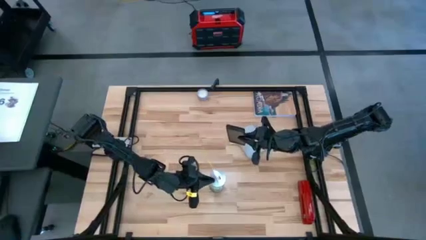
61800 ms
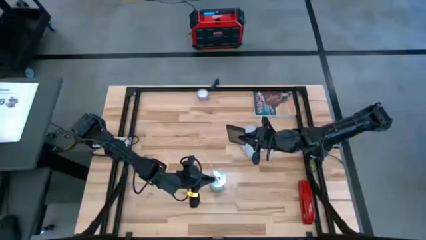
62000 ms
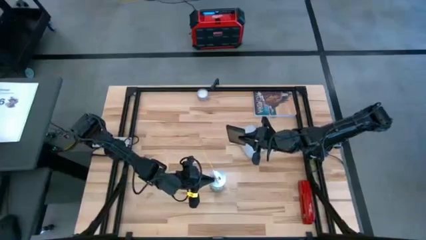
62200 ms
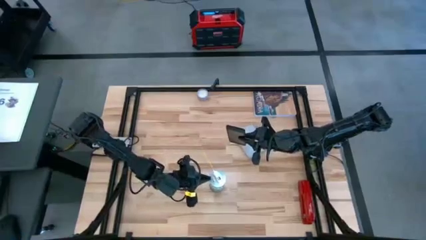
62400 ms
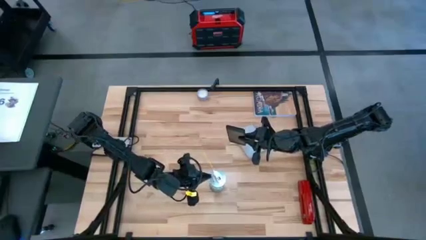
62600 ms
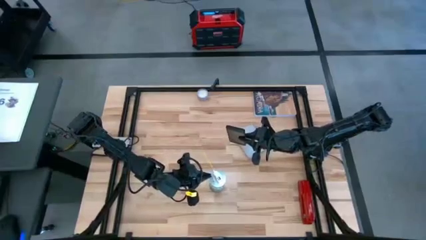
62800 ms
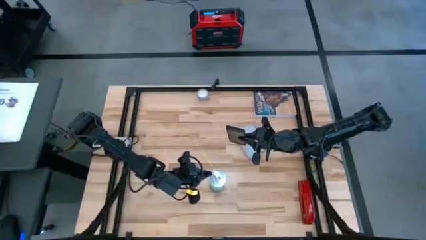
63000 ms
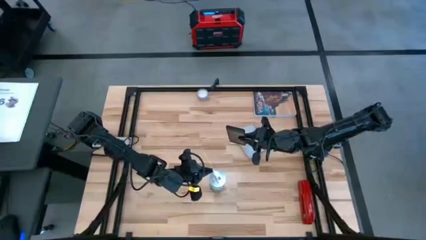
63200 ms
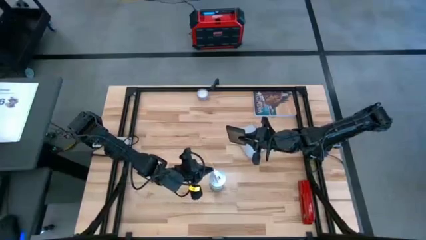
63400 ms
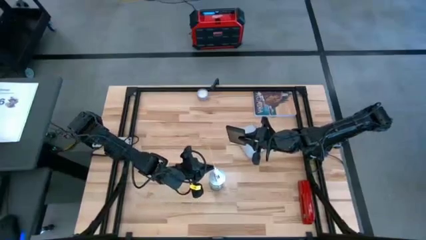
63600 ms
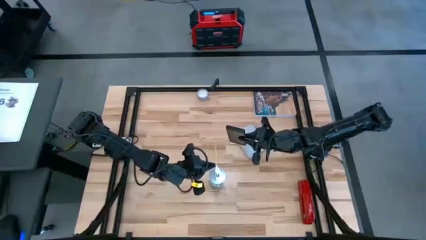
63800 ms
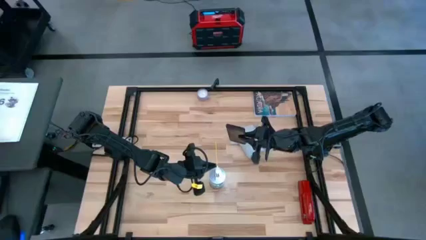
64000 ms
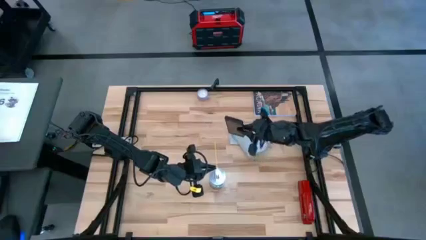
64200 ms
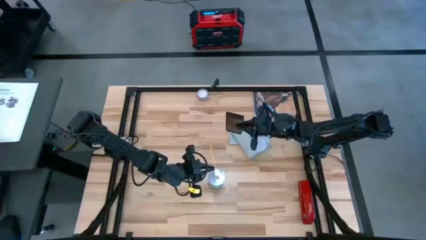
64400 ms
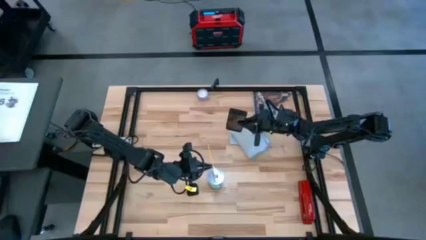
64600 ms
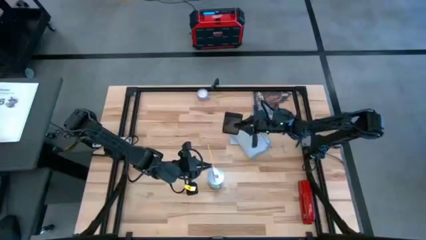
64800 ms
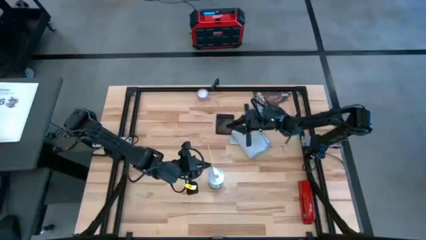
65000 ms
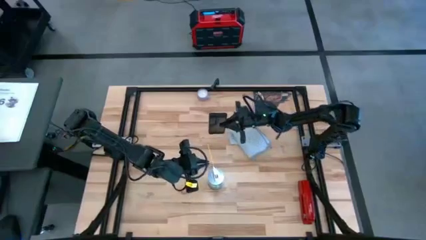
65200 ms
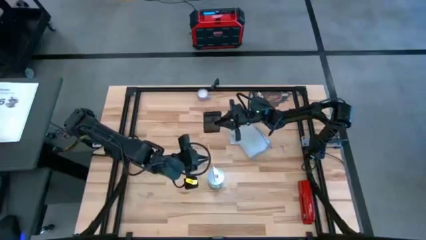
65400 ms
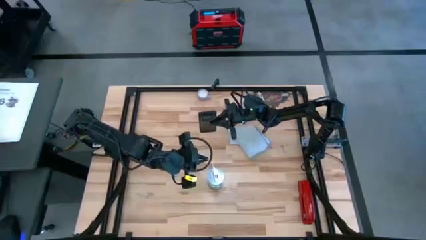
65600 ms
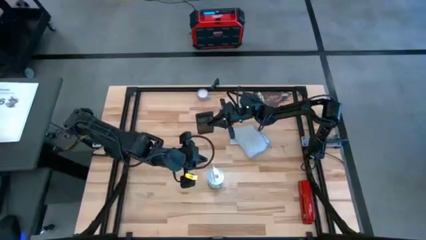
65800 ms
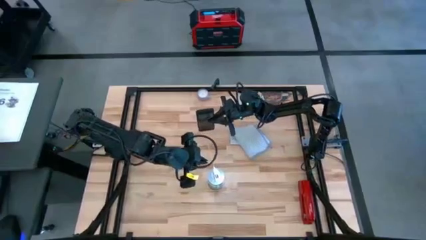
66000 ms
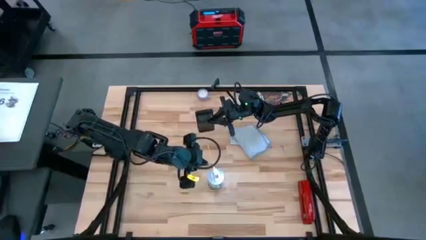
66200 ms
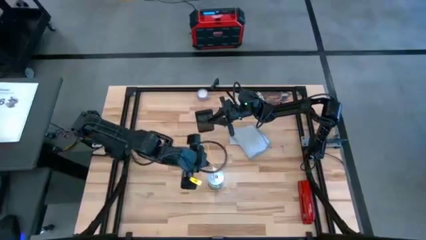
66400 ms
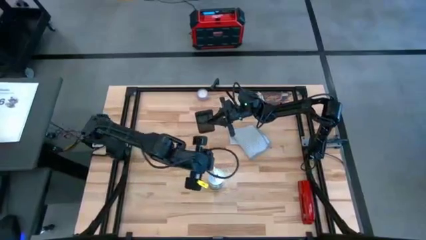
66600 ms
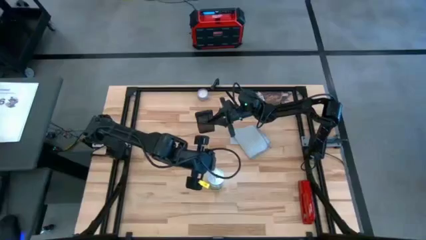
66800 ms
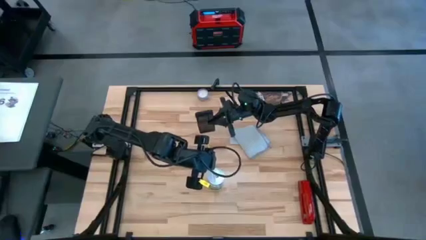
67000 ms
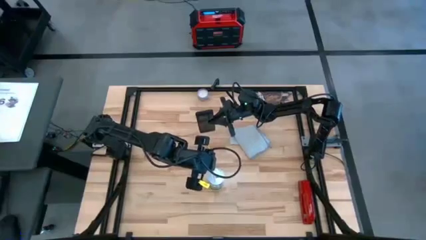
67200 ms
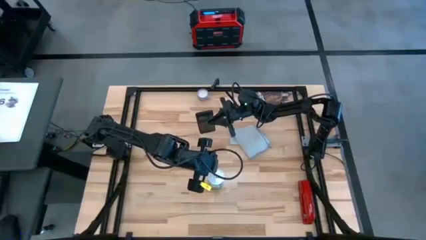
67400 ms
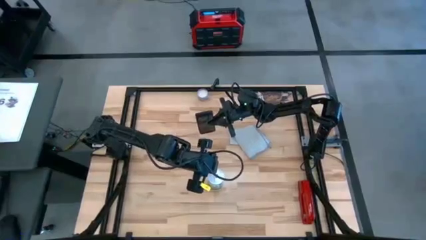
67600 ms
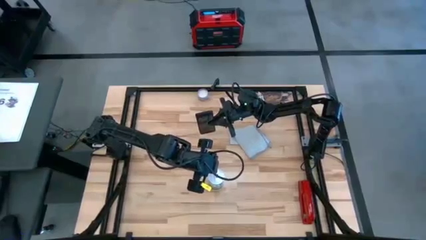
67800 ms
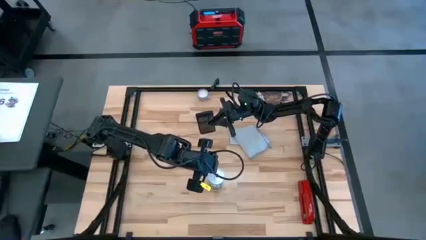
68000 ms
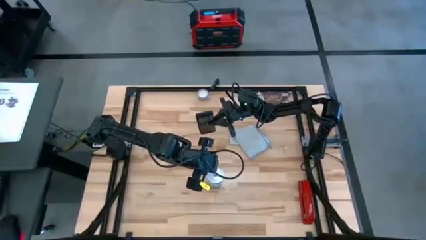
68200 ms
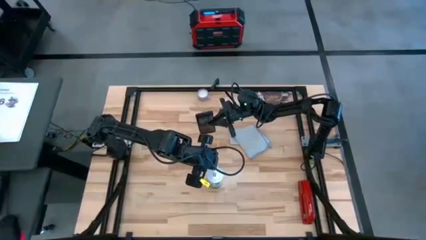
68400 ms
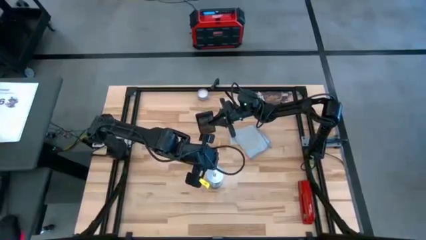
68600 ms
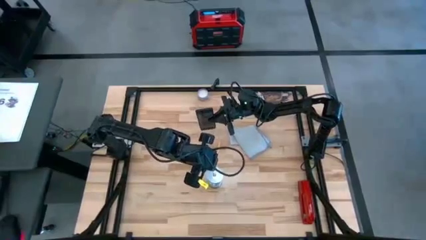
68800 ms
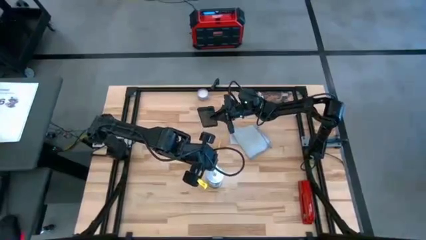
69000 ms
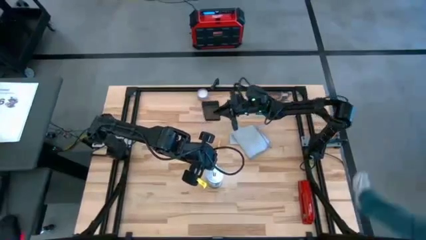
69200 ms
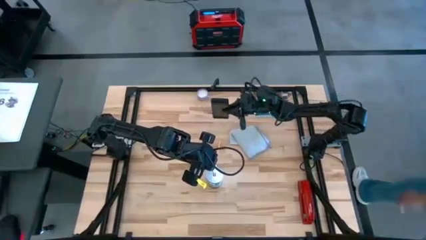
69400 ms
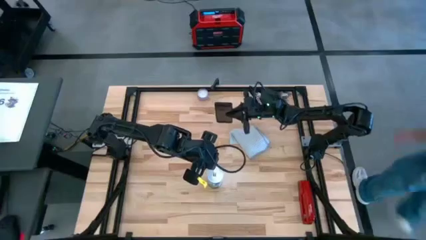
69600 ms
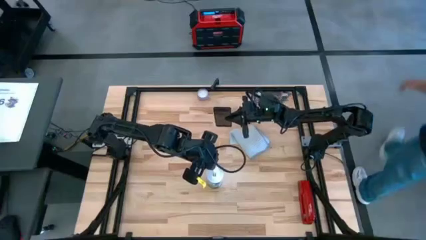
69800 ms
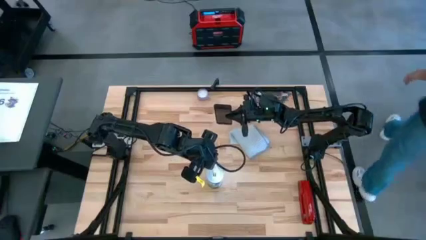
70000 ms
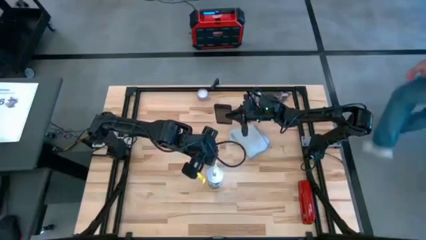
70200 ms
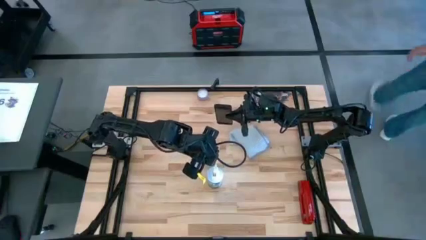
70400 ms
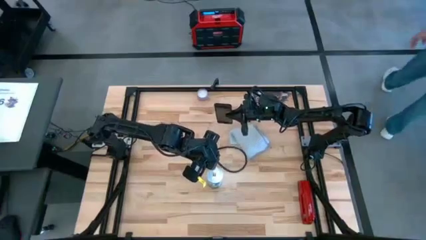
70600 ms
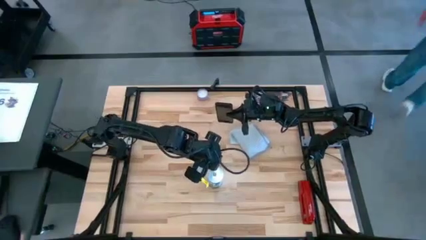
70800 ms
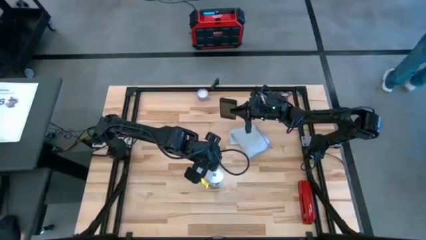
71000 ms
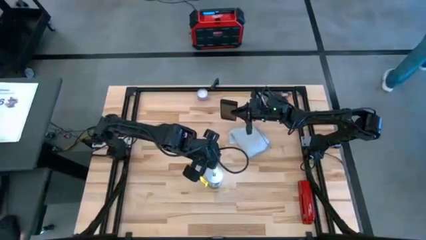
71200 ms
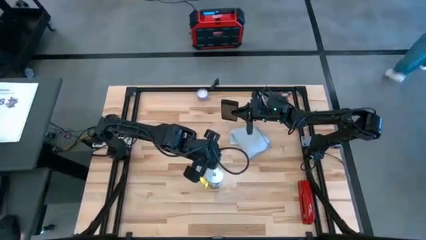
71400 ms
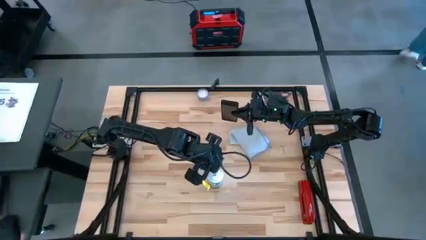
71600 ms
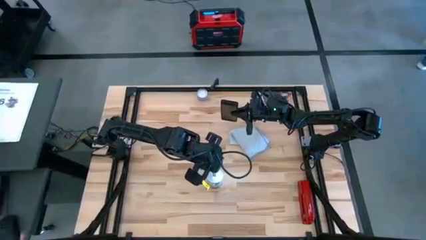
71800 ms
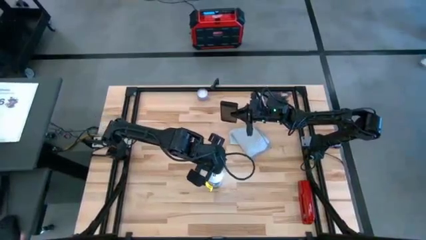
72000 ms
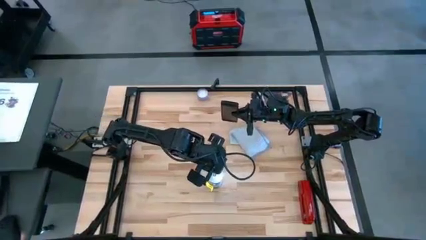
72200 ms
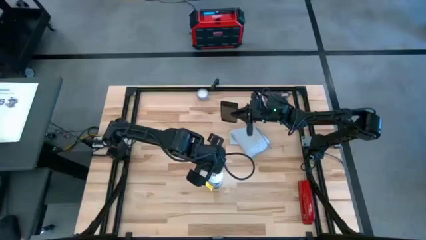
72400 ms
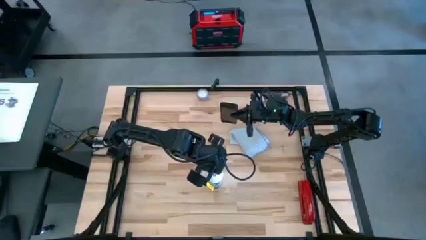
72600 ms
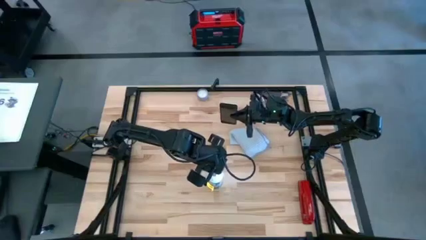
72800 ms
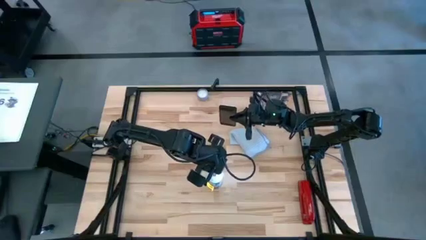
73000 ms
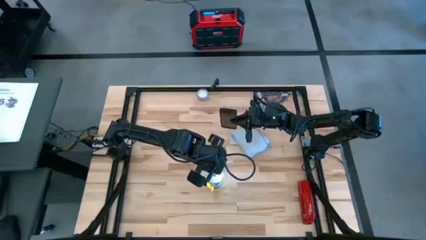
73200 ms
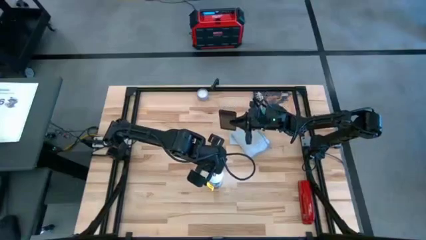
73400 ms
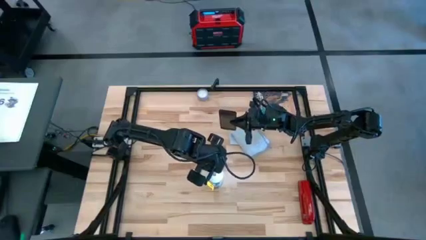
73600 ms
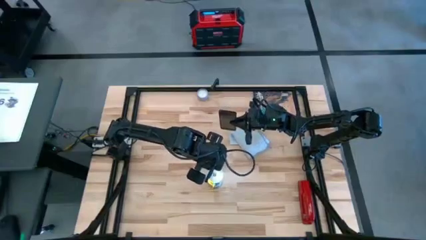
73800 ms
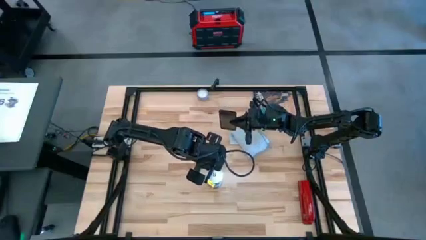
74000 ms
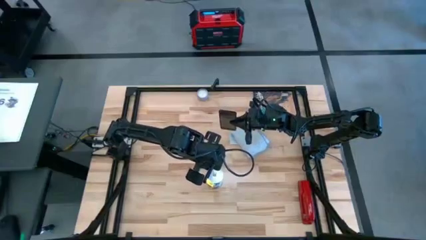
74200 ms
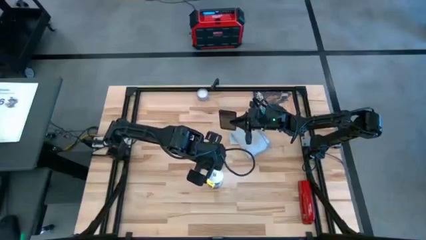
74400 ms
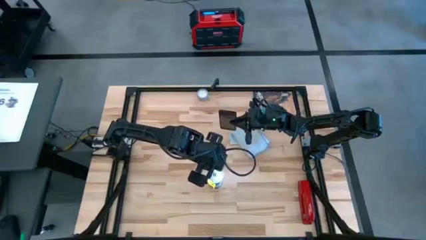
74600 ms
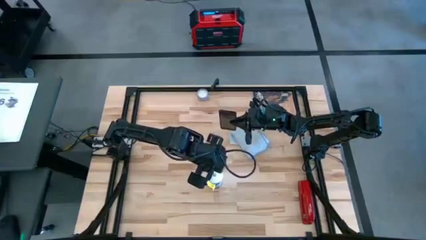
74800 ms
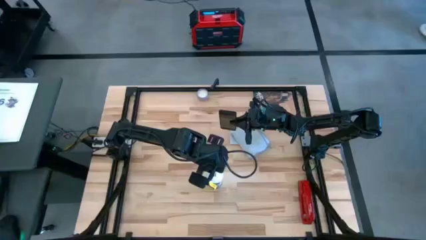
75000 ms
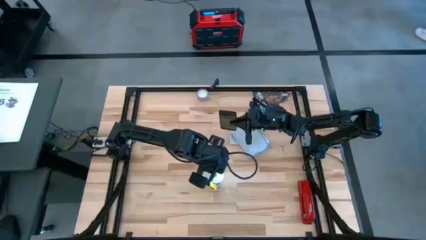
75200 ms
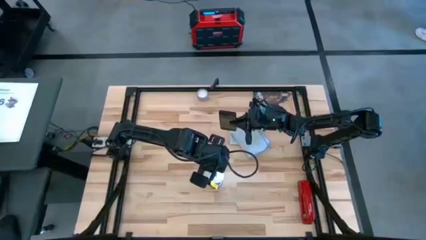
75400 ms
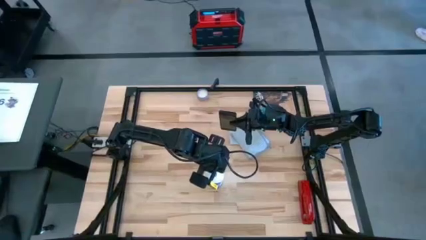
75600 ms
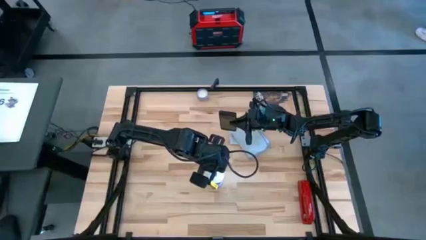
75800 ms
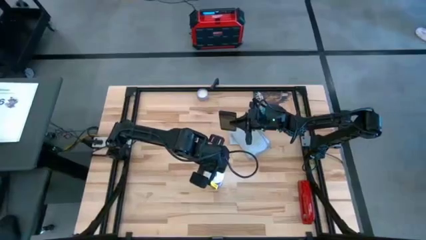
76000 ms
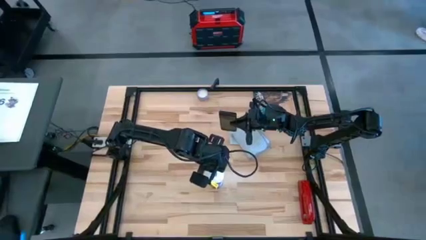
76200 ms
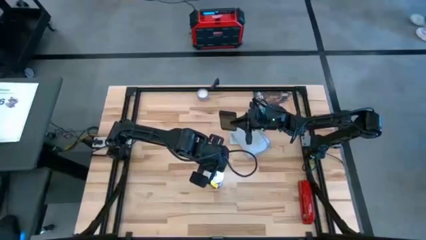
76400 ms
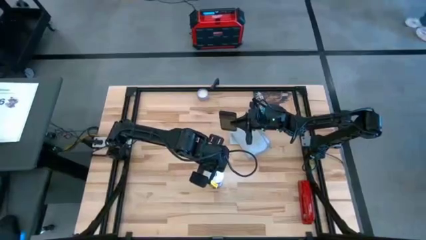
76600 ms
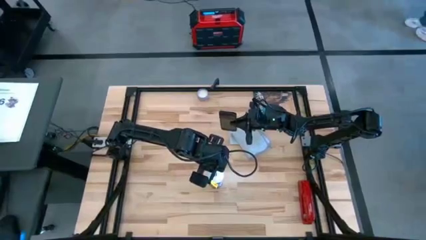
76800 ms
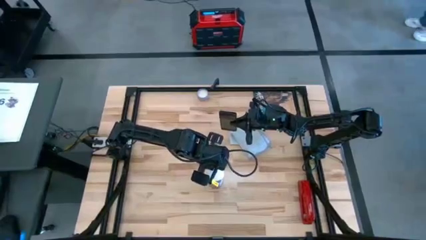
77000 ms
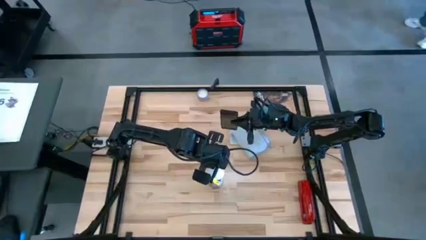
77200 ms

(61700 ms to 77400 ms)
Task: Apply microfiber cloth
Spray the front of the cellphone with the cleaning bottle
